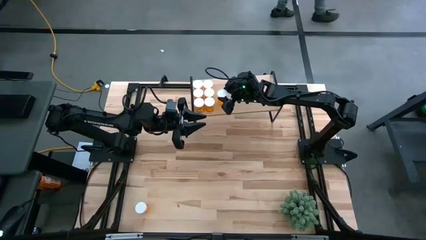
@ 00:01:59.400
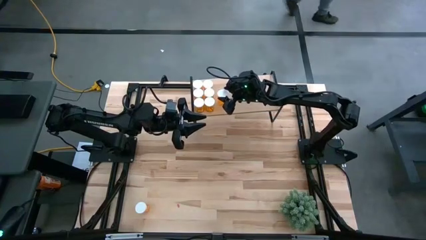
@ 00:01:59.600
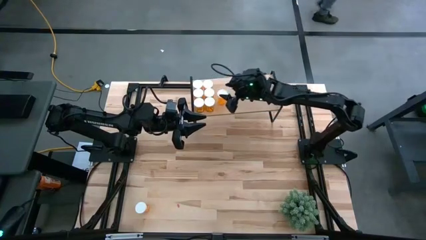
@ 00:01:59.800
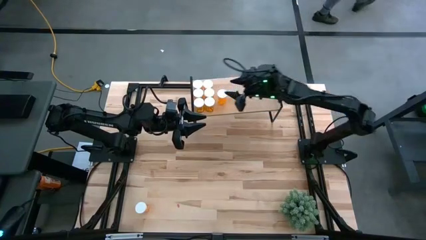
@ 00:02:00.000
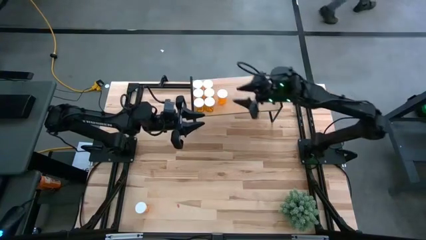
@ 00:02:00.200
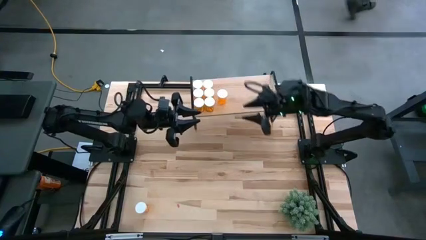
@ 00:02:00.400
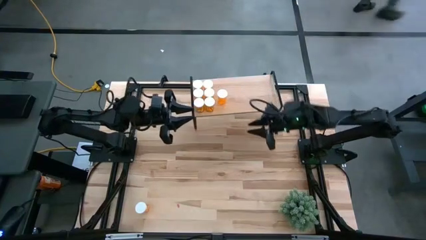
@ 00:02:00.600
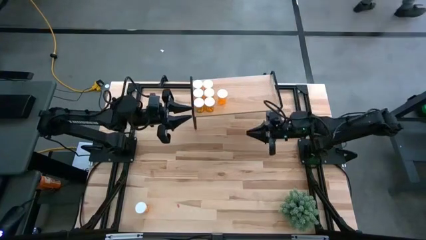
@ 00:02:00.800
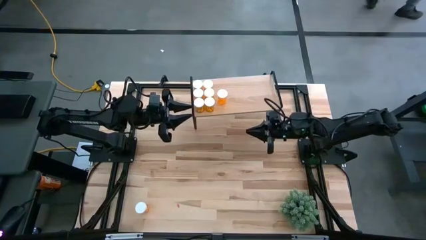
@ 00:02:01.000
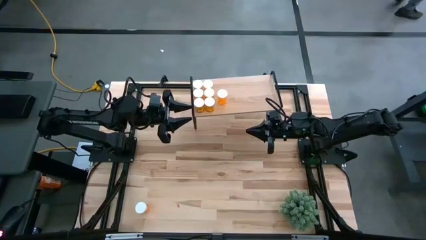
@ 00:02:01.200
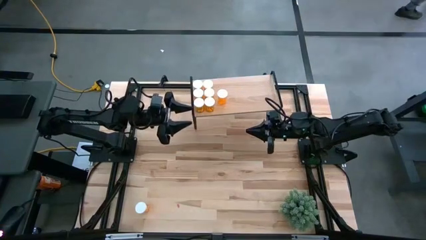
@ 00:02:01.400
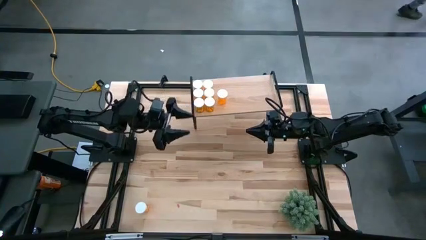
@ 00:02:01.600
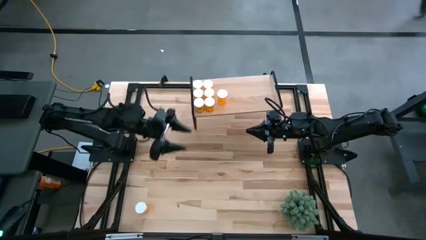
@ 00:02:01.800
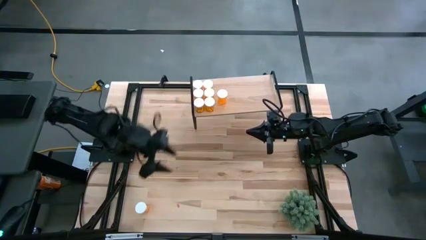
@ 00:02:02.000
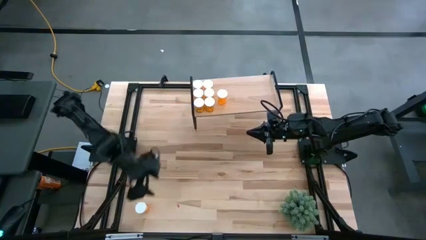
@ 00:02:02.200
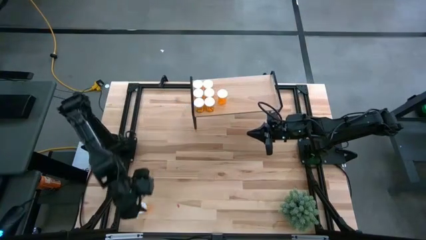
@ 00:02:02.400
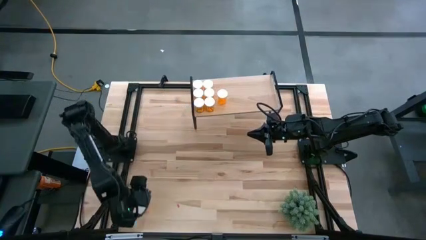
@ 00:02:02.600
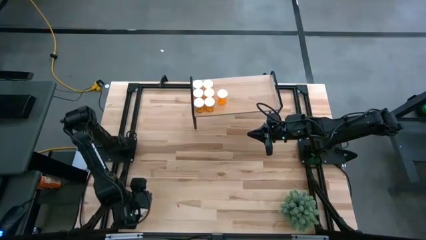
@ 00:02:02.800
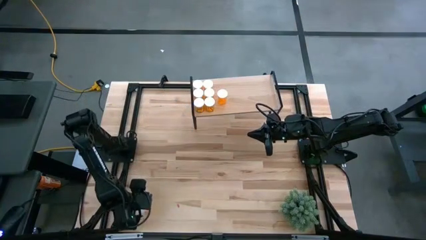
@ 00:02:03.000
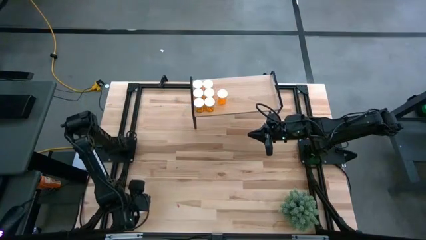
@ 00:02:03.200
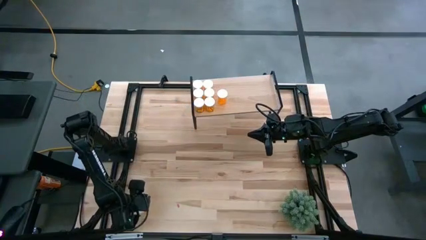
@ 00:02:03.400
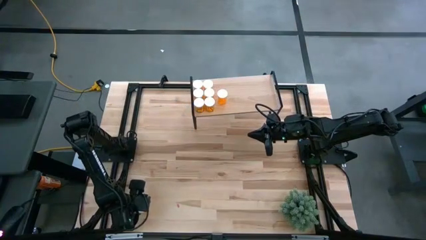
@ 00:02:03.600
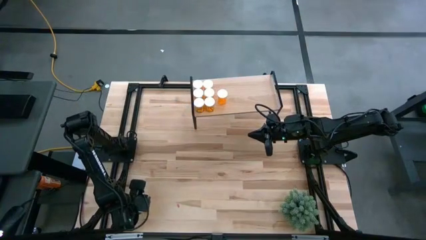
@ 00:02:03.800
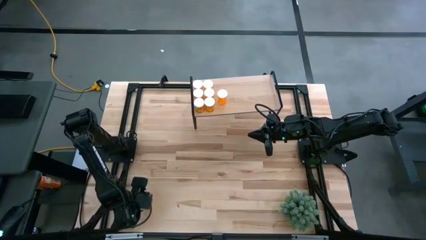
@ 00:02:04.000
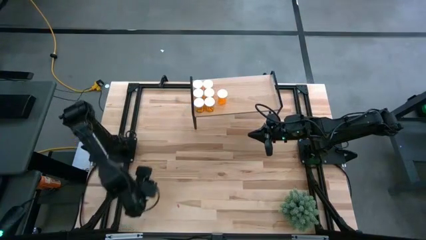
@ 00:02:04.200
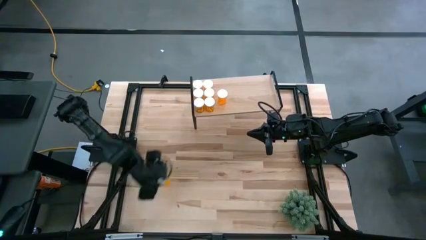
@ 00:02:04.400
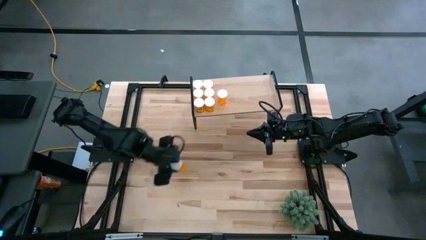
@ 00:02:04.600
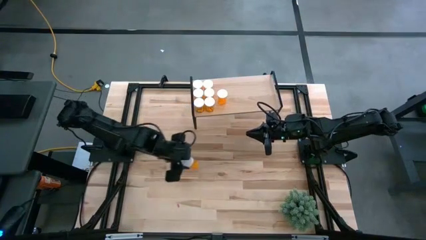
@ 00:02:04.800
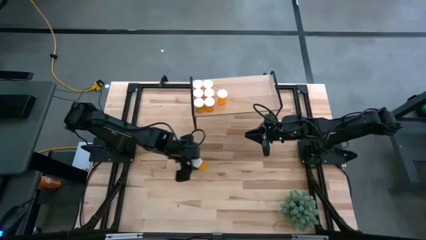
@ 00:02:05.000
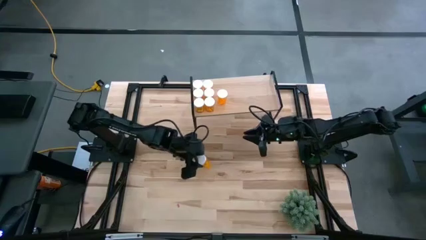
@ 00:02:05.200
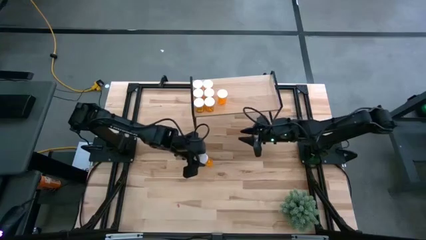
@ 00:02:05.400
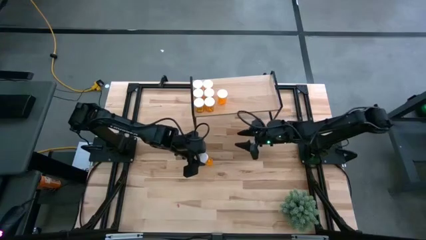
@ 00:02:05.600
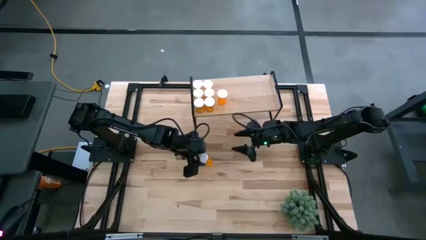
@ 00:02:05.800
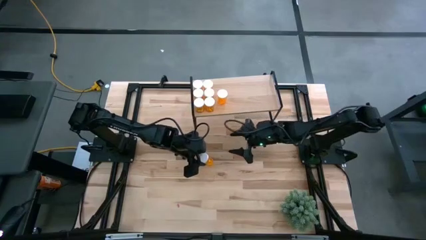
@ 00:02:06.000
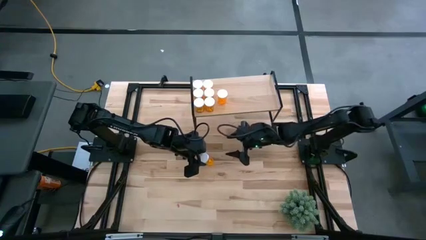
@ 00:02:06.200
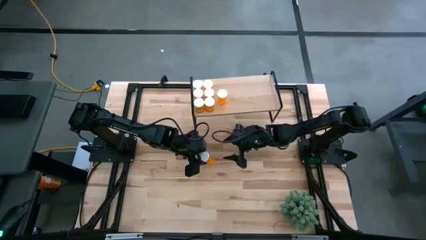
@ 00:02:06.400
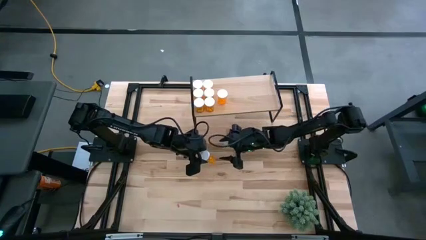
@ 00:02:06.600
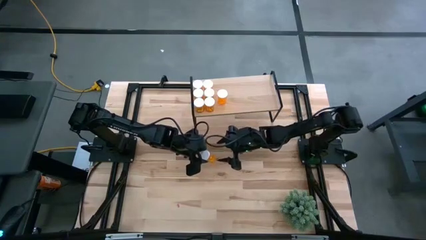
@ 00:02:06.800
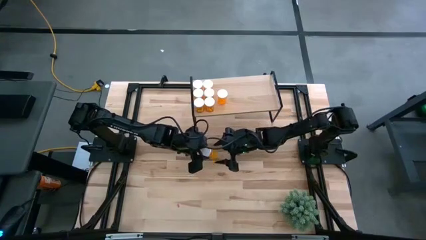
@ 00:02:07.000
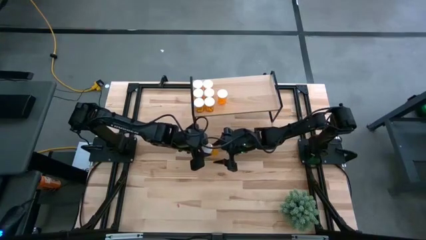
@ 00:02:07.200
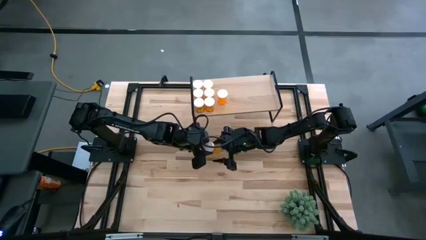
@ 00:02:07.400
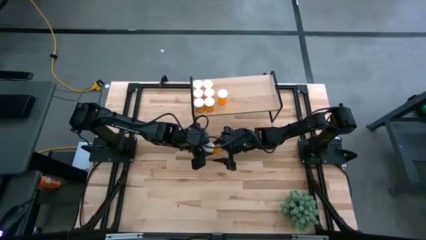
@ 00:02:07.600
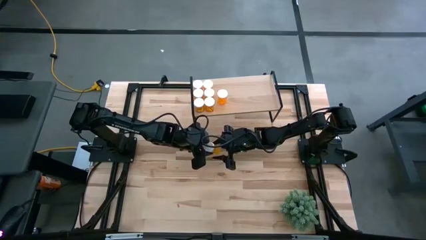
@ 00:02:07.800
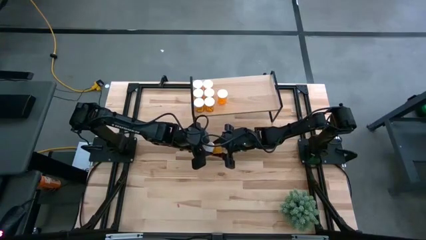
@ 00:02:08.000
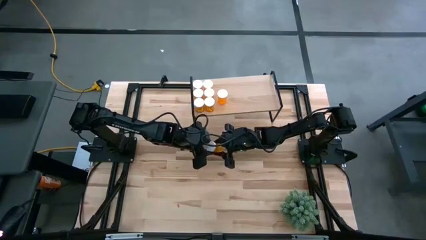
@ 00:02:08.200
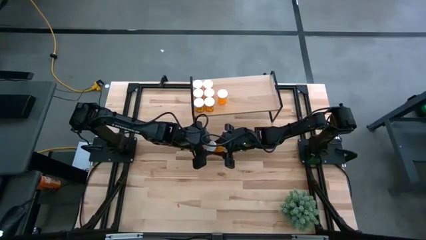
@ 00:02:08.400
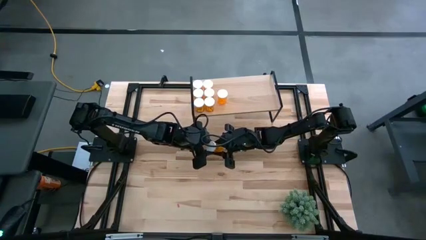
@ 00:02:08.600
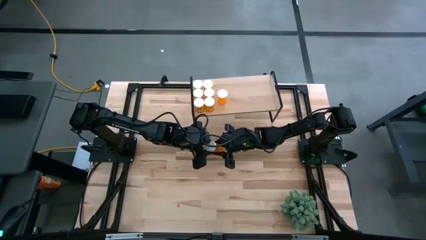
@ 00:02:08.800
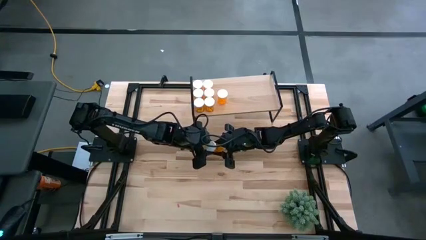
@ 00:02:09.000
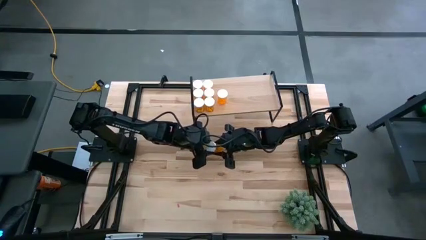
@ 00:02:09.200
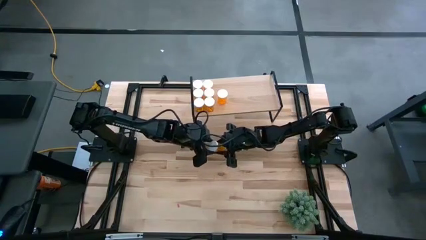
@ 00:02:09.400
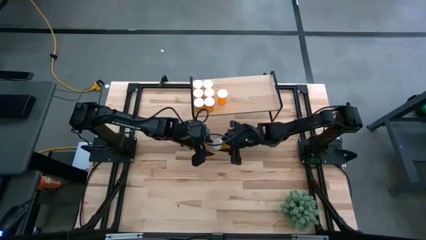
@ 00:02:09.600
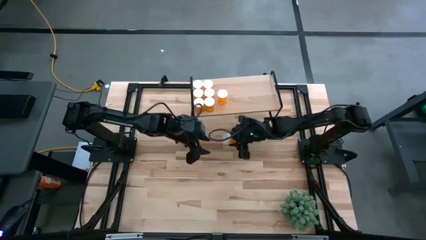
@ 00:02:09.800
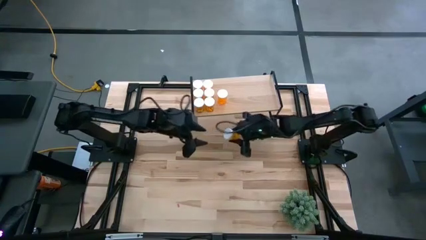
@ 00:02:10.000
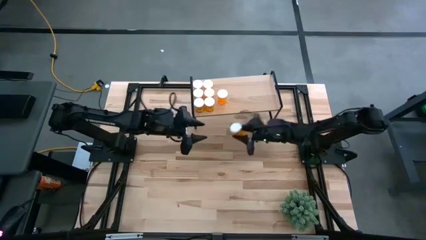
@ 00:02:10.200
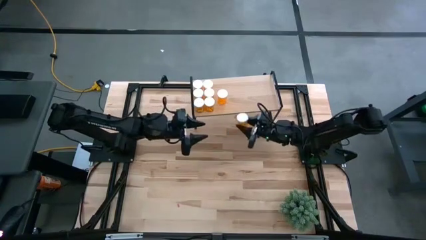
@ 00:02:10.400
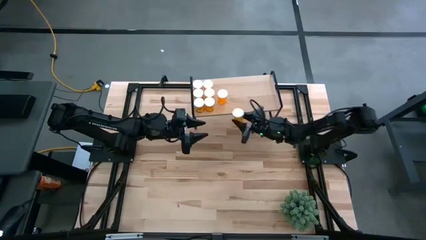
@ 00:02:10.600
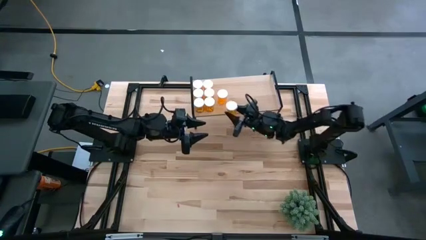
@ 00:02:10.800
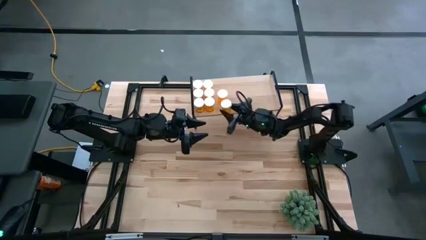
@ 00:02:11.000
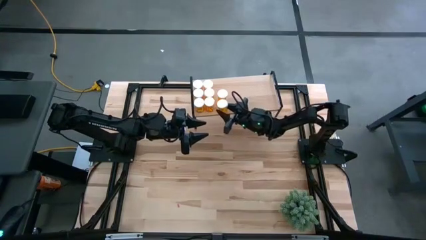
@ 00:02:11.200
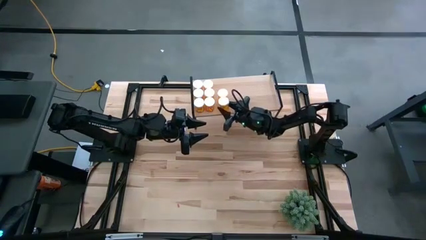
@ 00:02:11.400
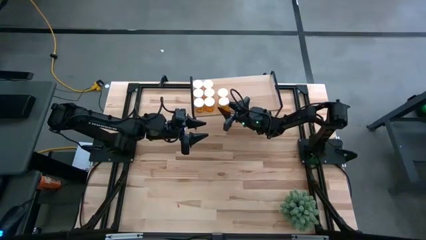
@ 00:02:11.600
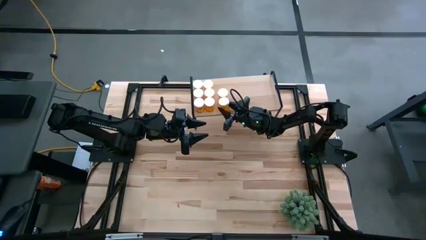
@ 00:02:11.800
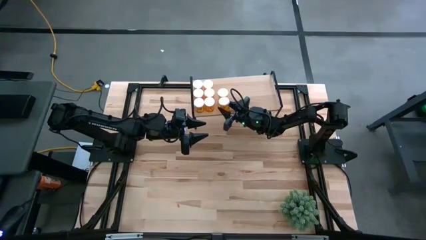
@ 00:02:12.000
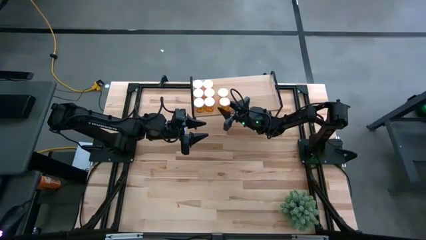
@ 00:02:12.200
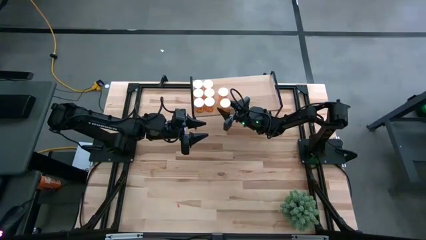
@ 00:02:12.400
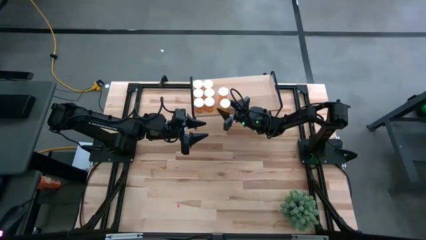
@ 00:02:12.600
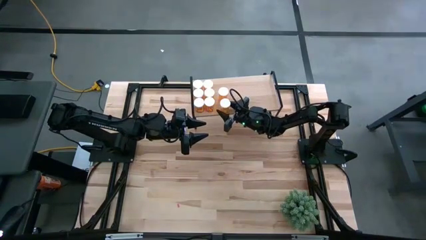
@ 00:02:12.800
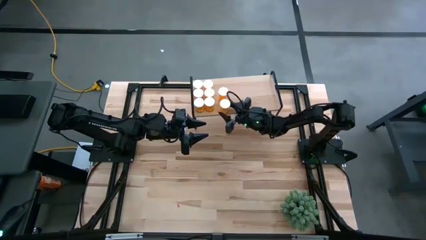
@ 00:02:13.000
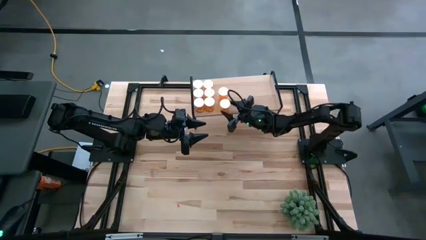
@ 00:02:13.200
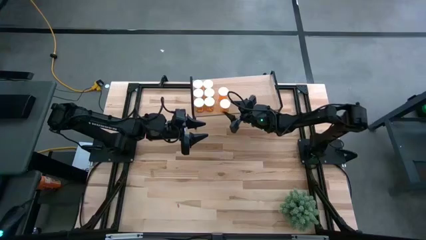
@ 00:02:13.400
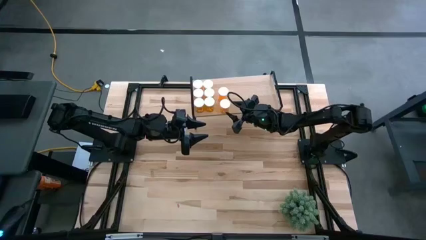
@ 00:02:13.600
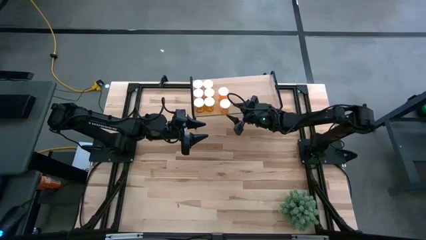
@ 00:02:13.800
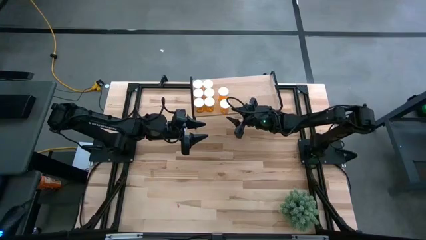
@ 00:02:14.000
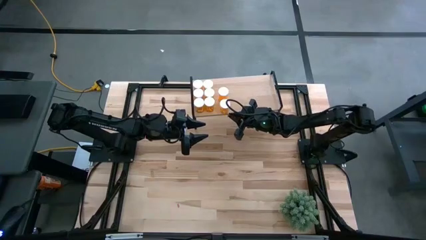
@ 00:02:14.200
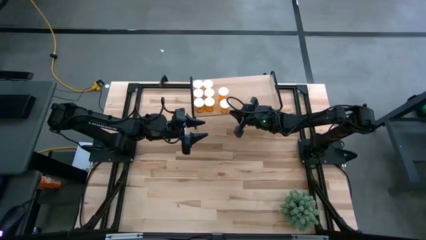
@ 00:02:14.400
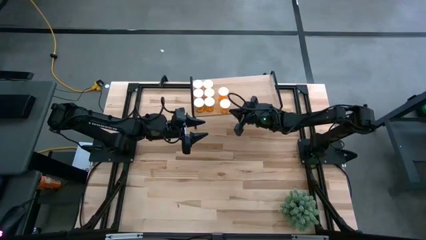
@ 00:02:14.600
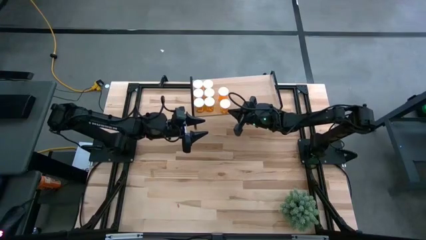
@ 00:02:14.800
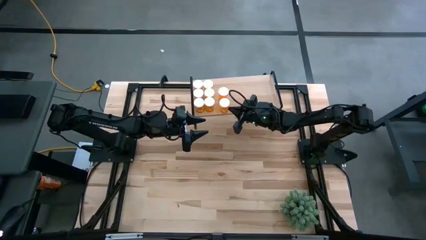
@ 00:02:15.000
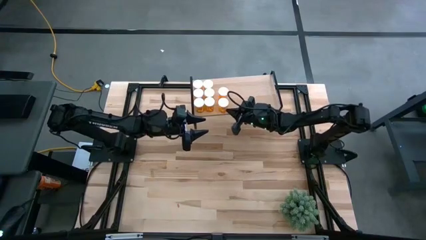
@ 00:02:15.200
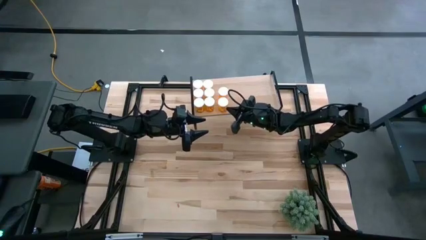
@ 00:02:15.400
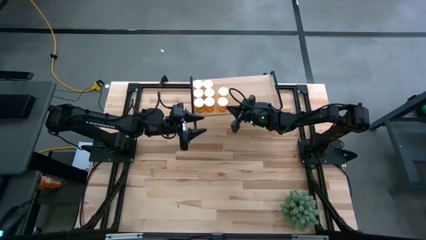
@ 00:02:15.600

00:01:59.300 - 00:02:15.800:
Task: Pick and place medicine bottles onto shelf by color
Put the orange pill bottle on the shelf aligned with the other orange pill bottle
